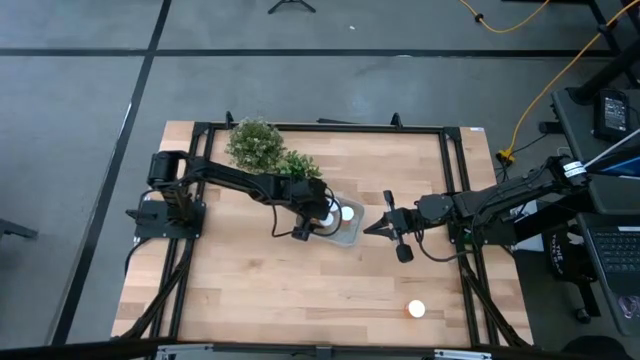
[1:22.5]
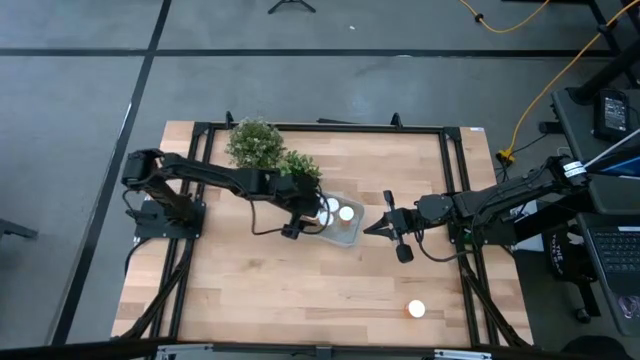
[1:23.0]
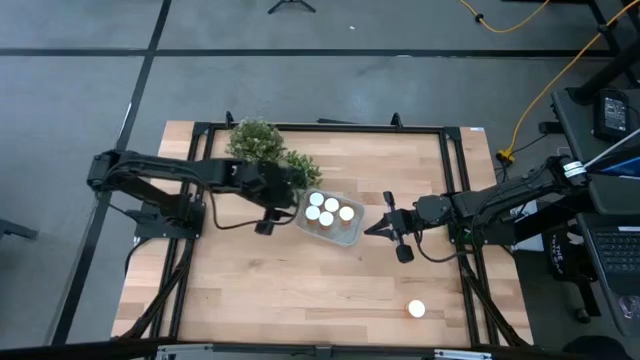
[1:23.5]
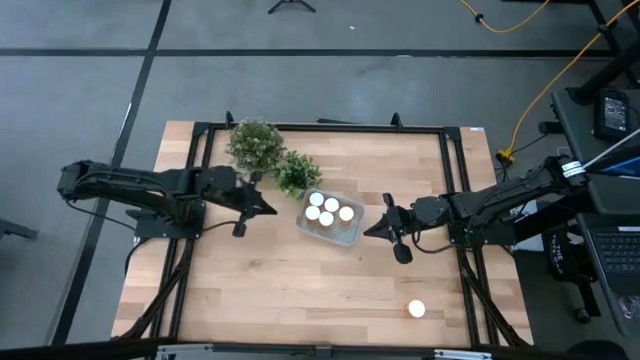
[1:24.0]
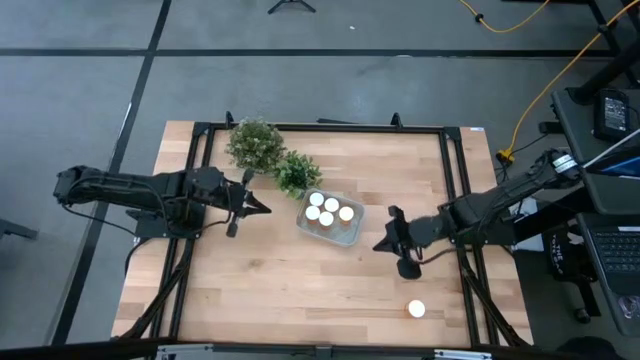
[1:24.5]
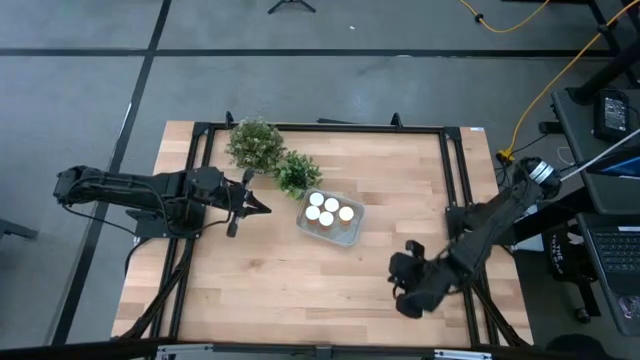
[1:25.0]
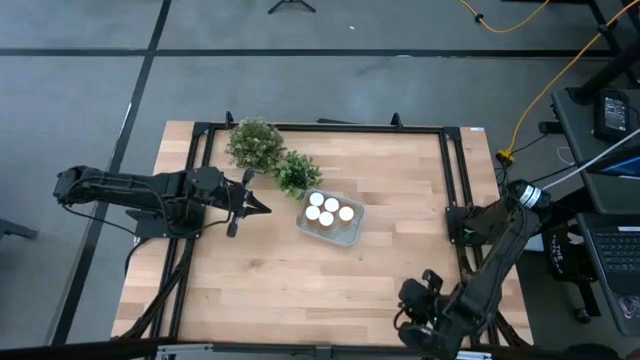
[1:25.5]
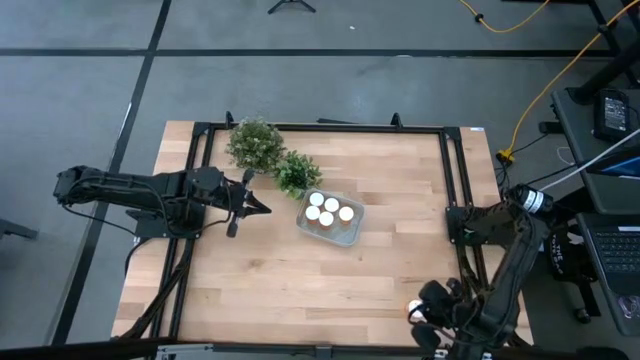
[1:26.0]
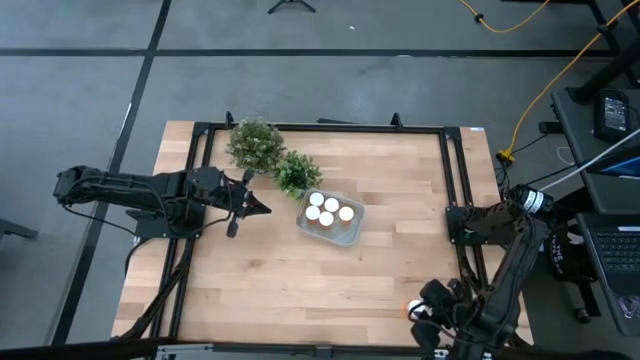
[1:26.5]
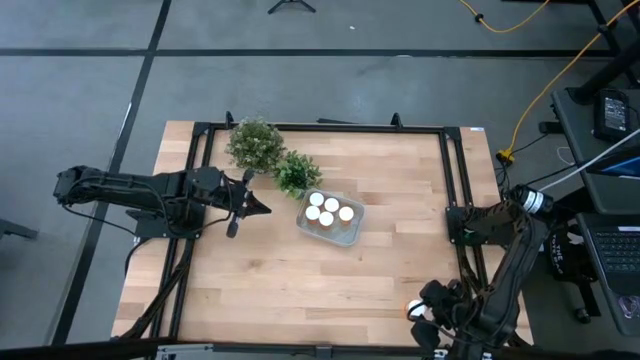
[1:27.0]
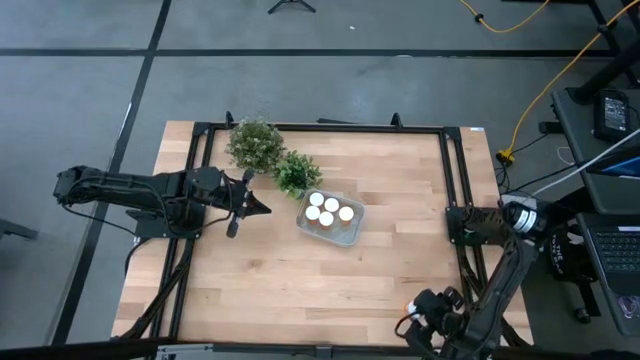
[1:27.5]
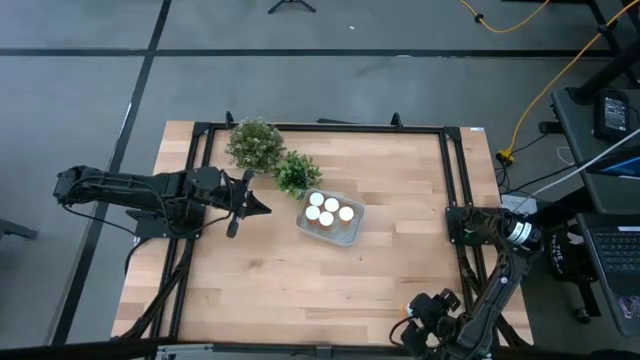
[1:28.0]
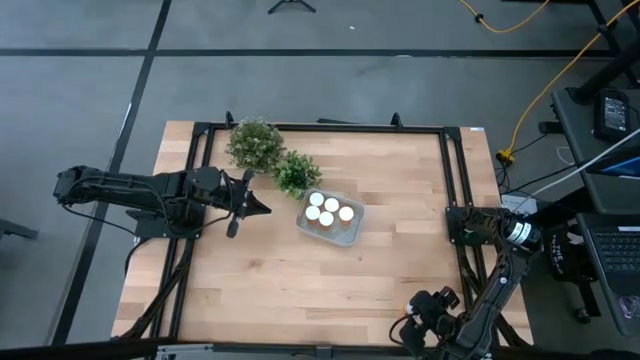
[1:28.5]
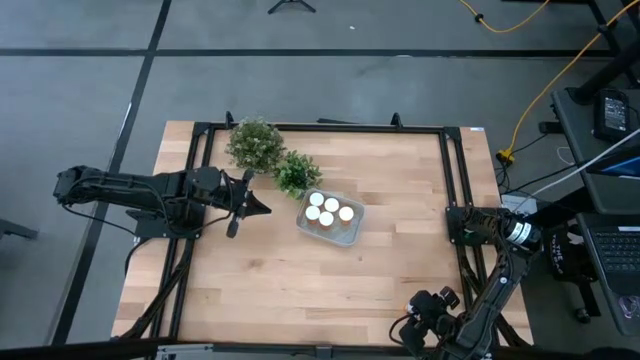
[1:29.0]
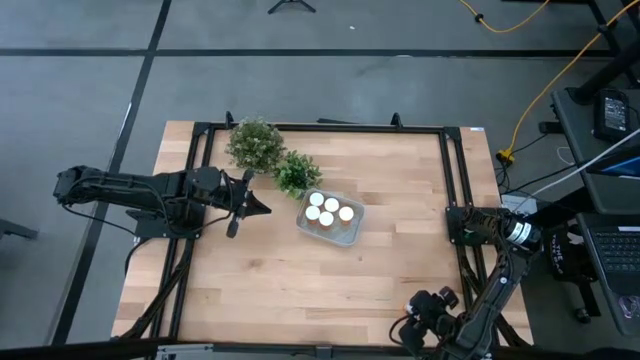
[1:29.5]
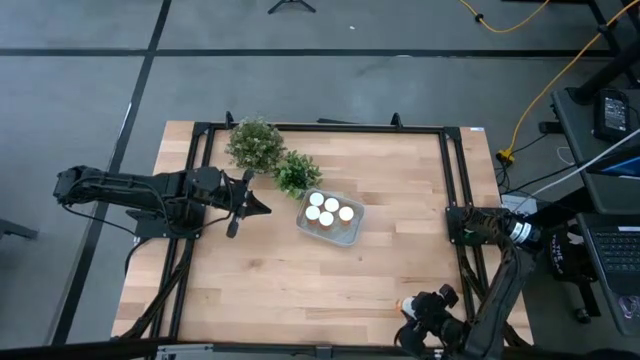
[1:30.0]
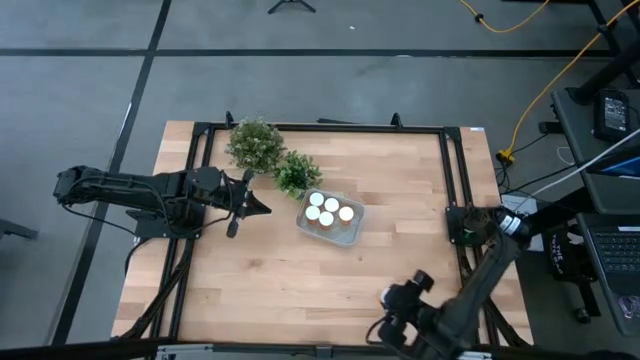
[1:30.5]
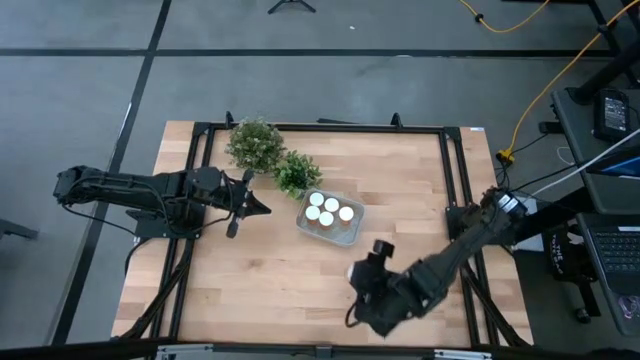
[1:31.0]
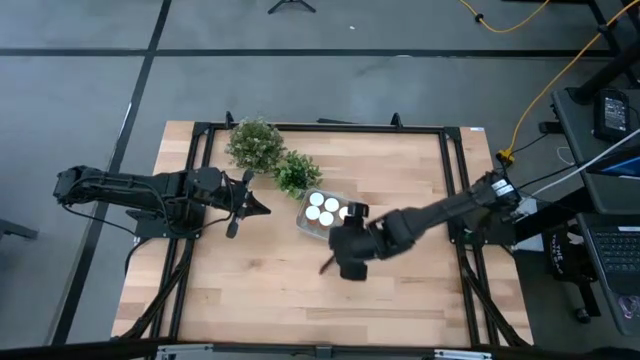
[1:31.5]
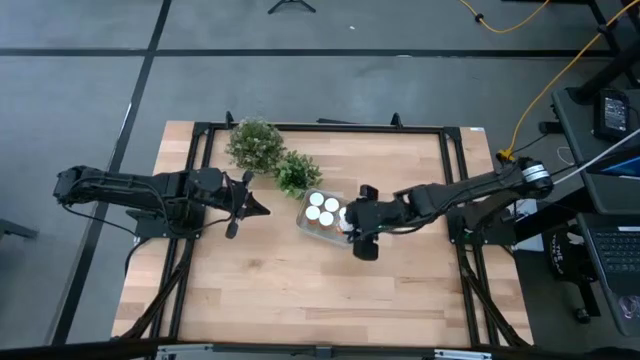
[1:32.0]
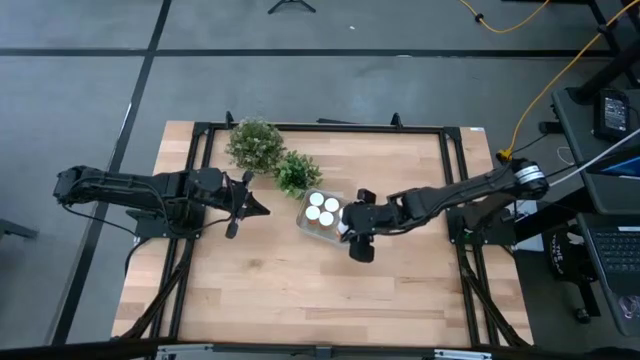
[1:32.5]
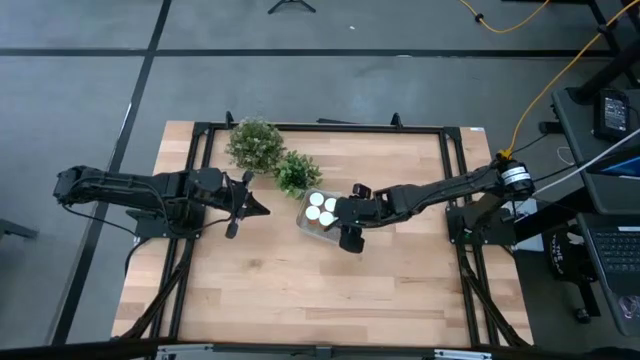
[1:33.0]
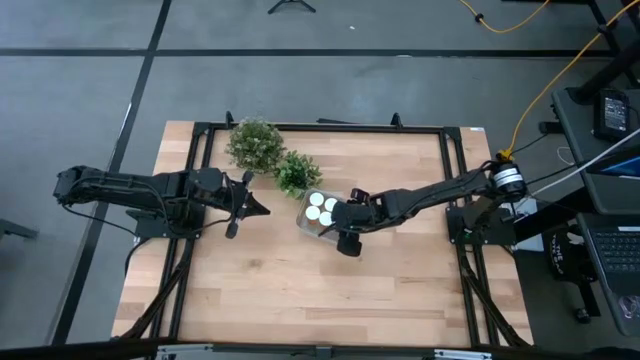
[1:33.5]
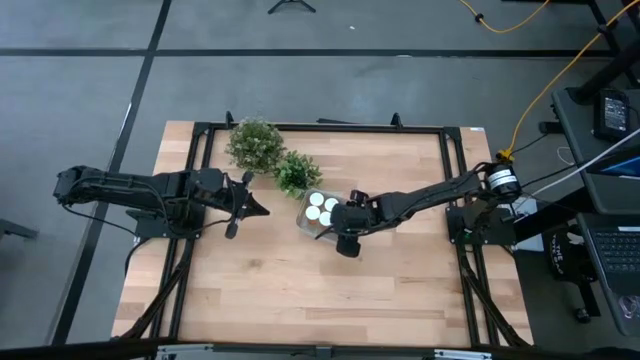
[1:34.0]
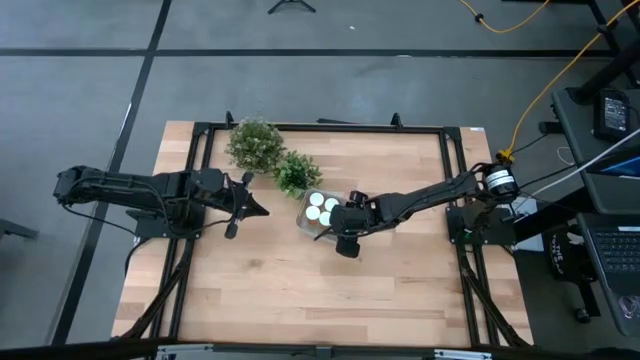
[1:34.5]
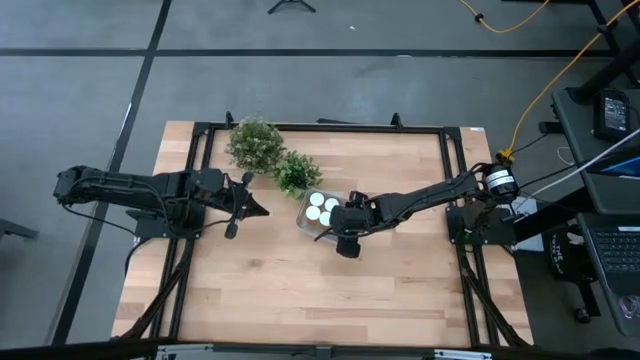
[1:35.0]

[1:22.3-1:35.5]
Task: Pick and place pill bottles into a basket
Put the orange pill bottle into the grey bin

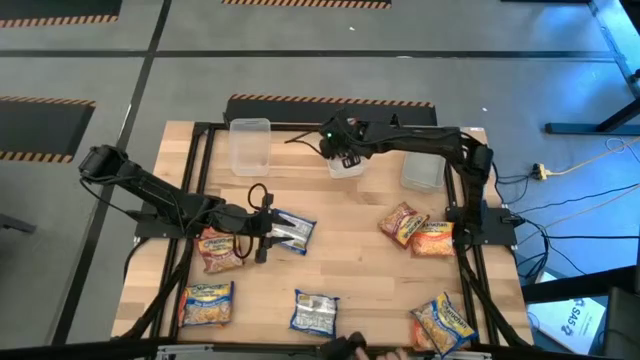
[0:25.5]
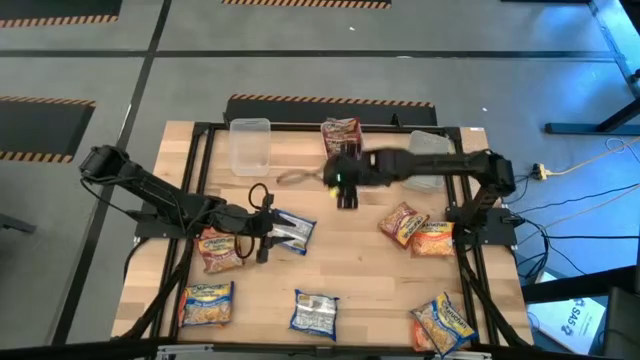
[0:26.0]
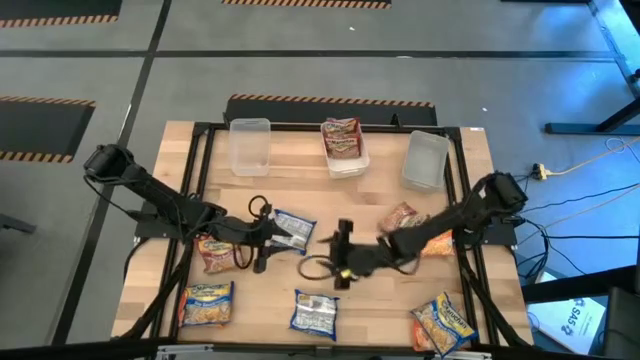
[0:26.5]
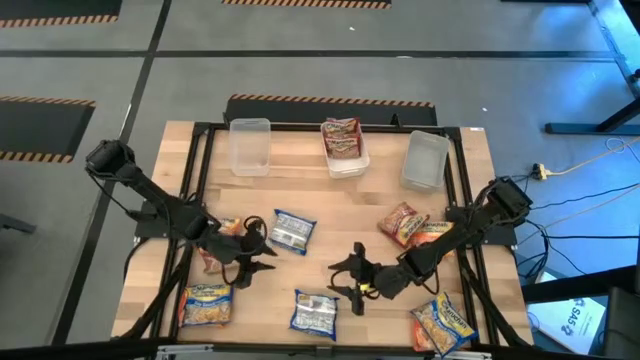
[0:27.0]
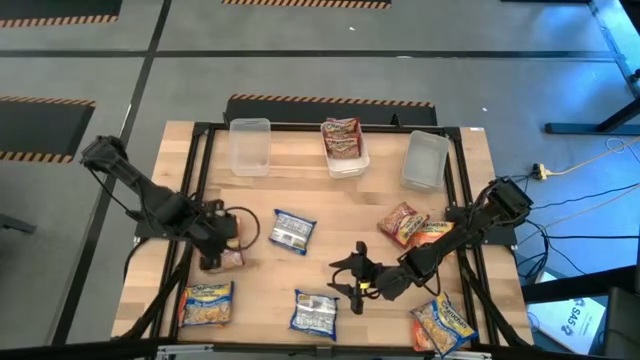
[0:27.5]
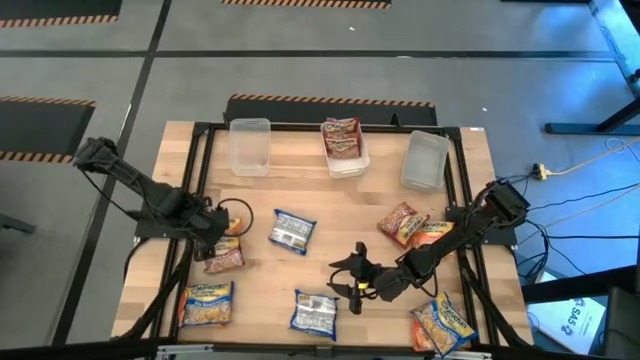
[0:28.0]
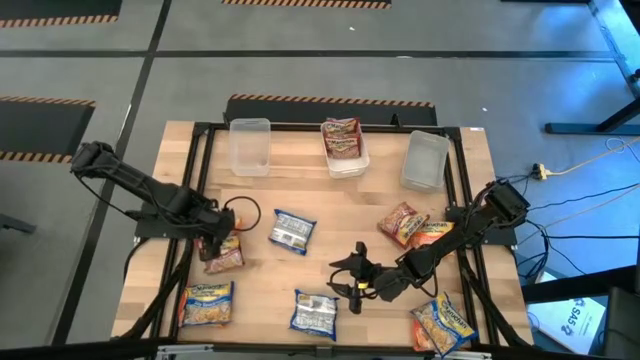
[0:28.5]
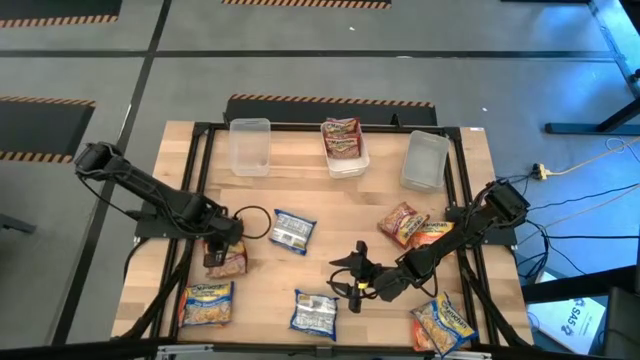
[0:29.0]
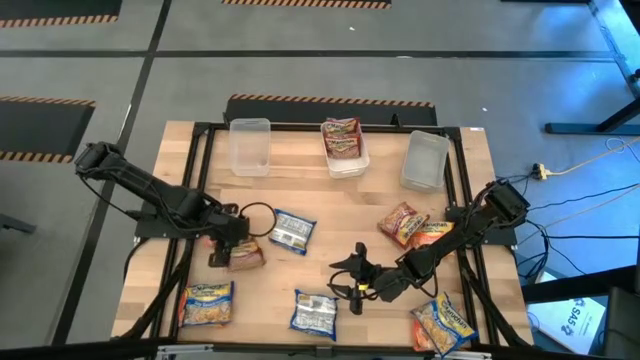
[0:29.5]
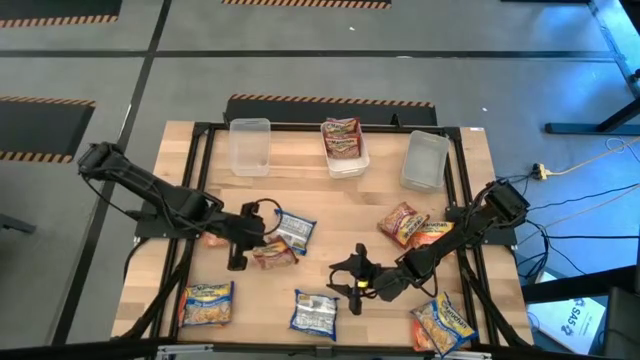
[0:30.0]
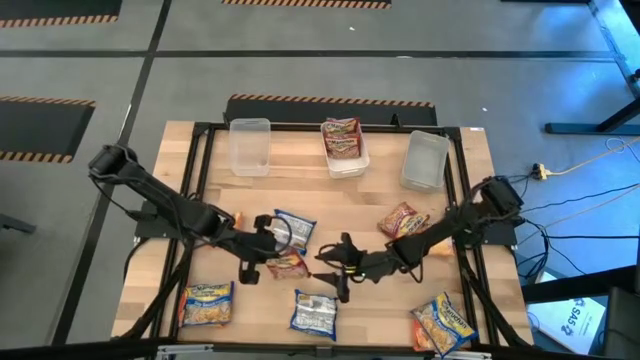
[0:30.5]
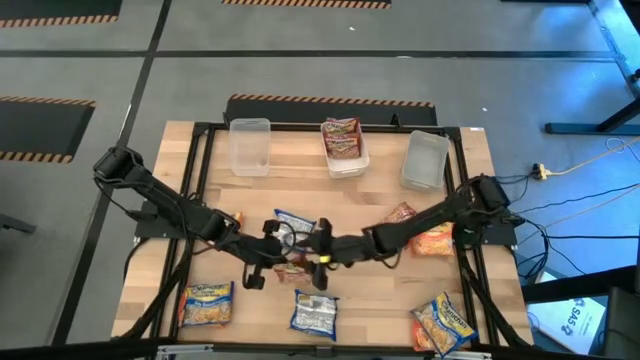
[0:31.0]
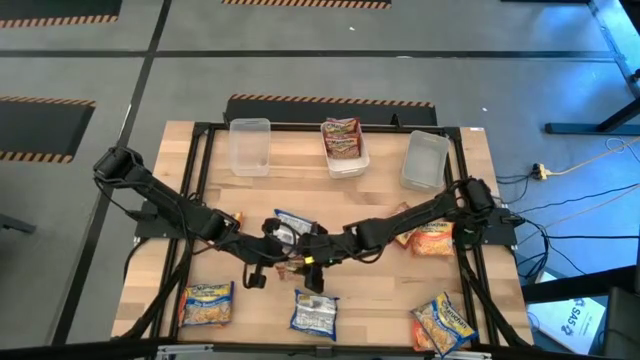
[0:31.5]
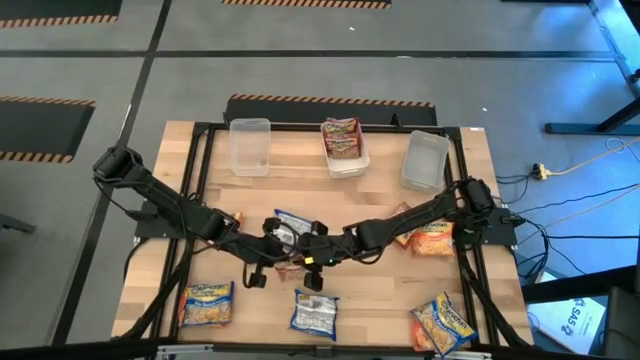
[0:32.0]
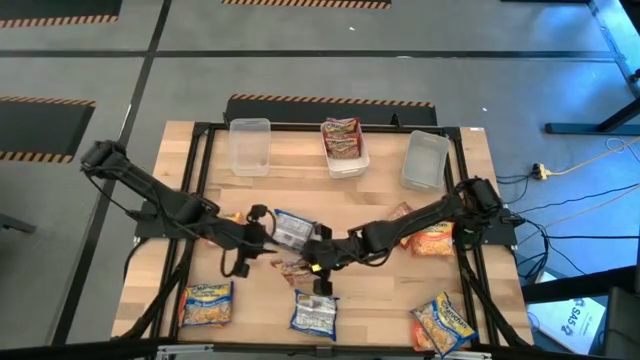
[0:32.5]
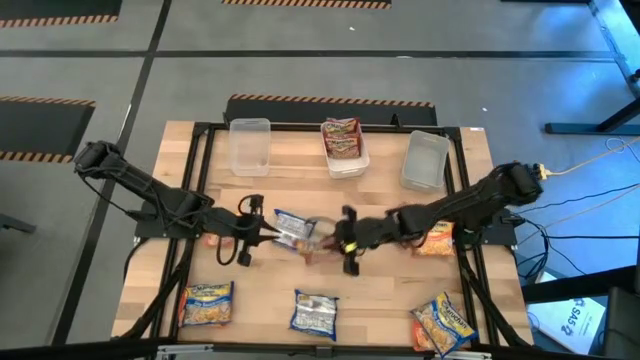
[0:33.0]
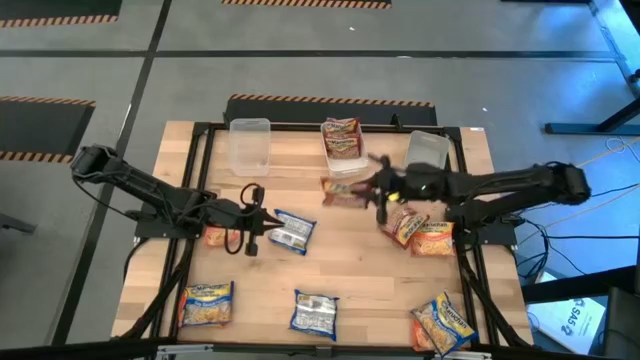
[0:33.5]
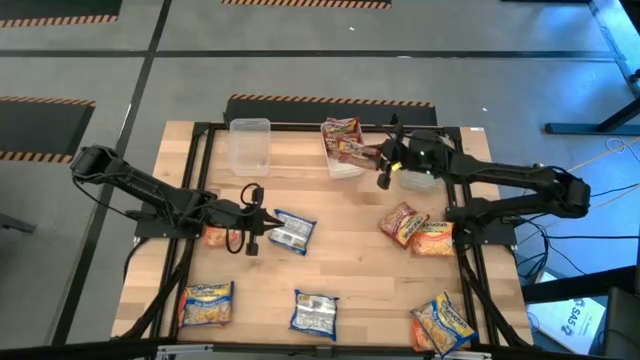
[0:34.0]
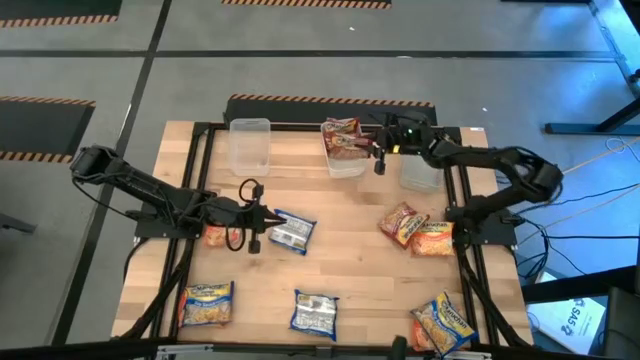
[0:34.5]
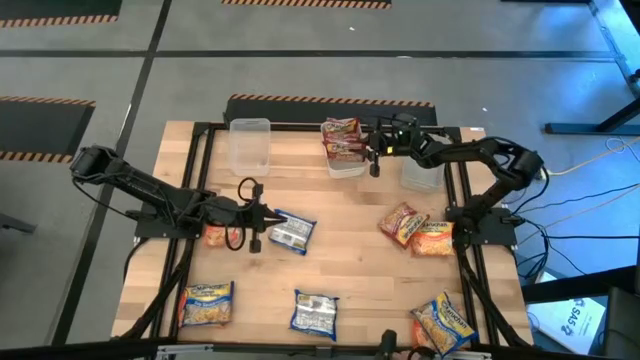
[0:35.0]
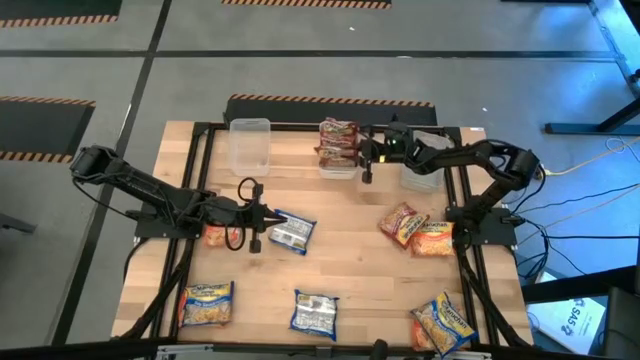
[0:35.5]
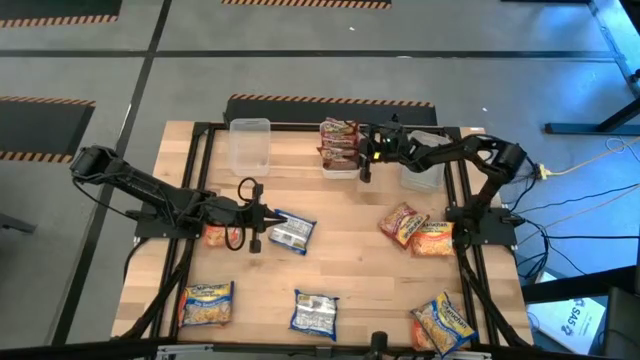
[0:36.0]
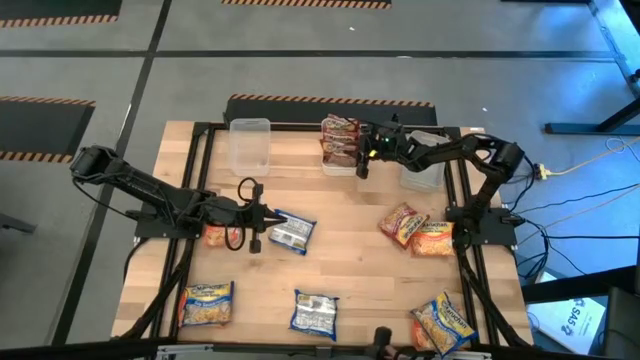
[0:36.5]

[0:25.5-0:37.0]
Task: Sort Maruchan noodles
Put the red noodle pack into the white bin
